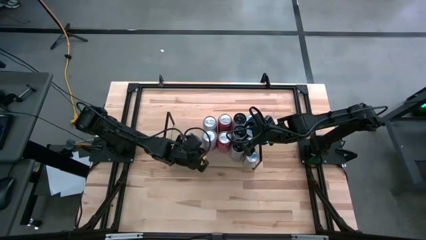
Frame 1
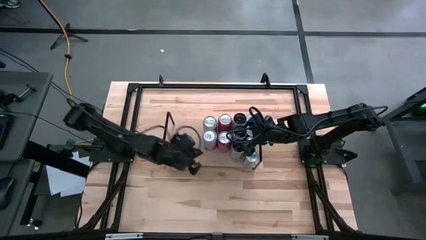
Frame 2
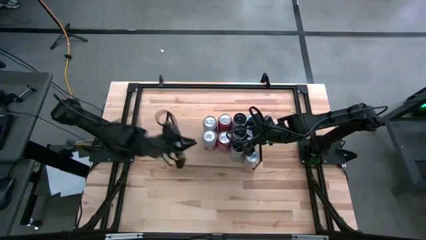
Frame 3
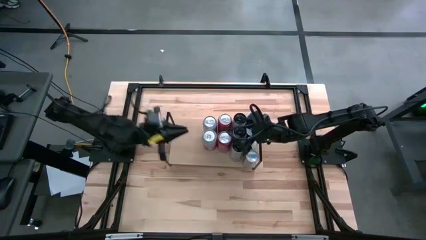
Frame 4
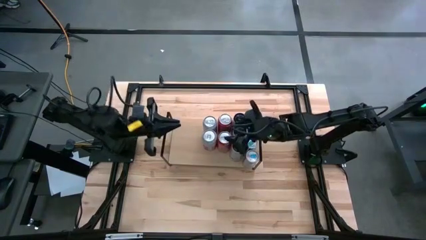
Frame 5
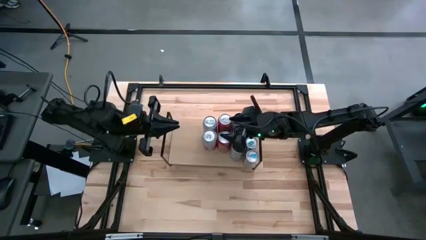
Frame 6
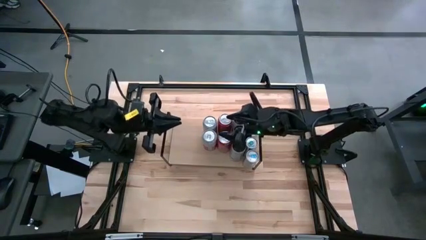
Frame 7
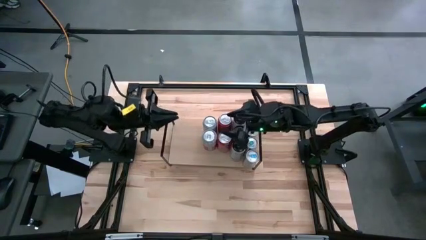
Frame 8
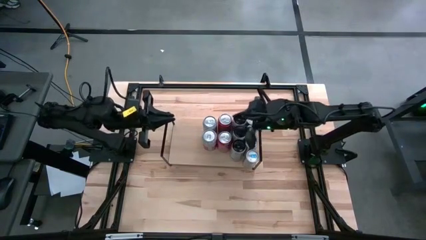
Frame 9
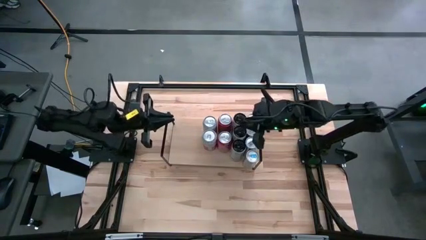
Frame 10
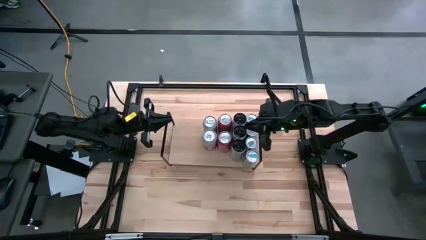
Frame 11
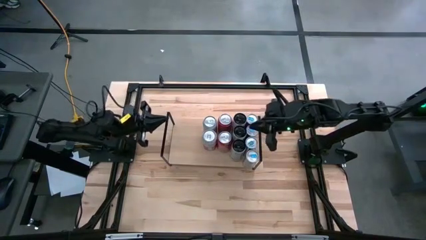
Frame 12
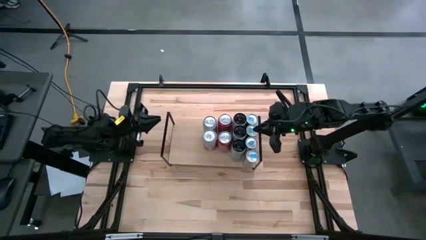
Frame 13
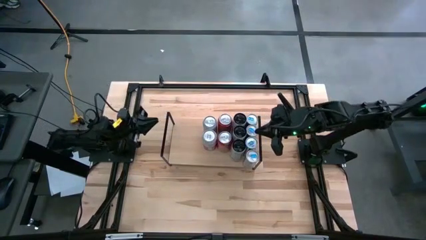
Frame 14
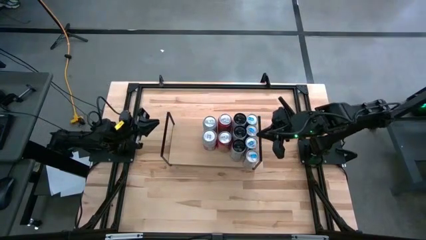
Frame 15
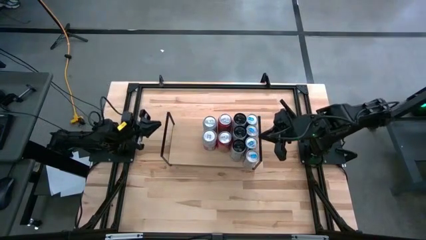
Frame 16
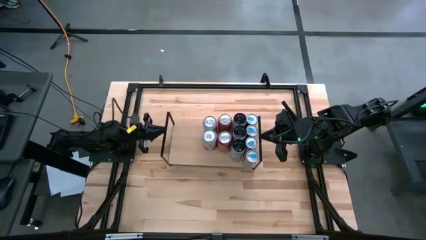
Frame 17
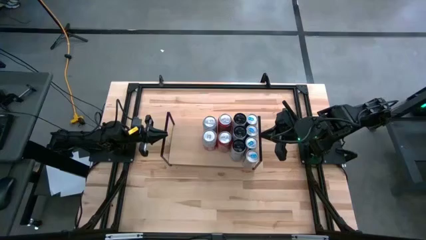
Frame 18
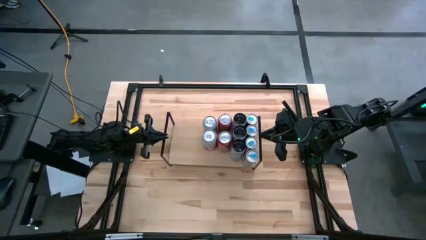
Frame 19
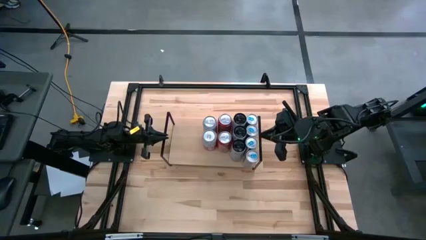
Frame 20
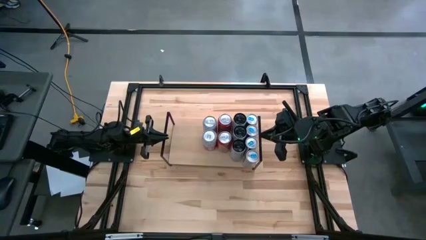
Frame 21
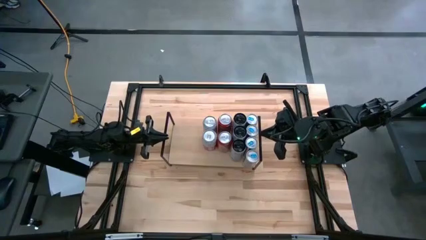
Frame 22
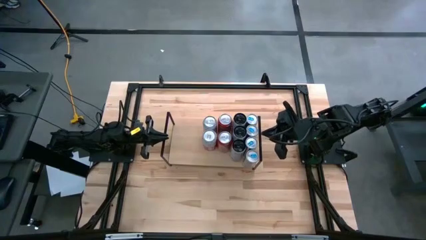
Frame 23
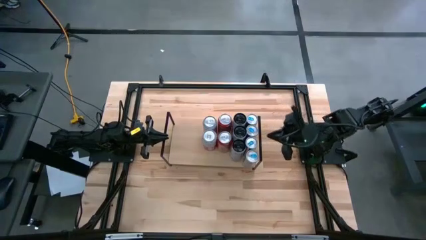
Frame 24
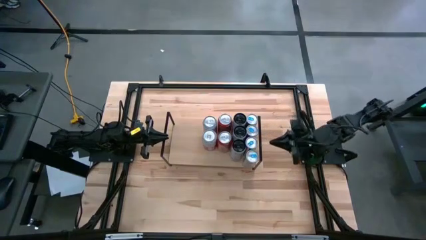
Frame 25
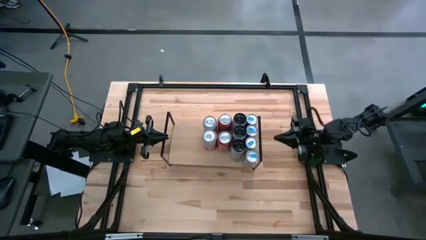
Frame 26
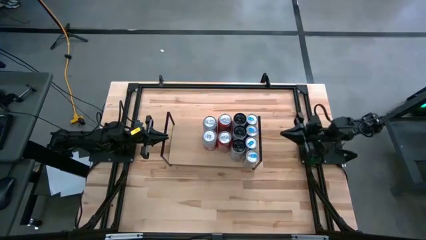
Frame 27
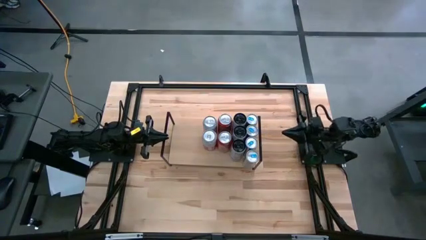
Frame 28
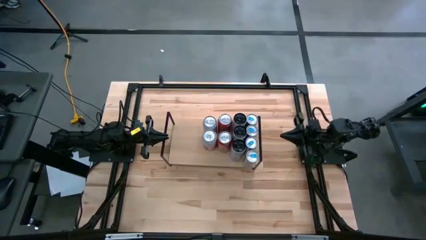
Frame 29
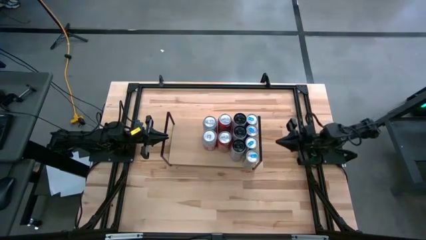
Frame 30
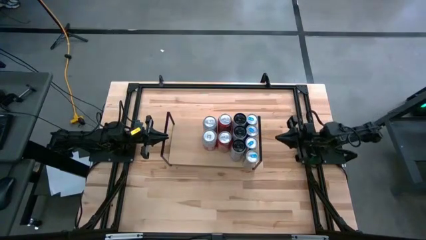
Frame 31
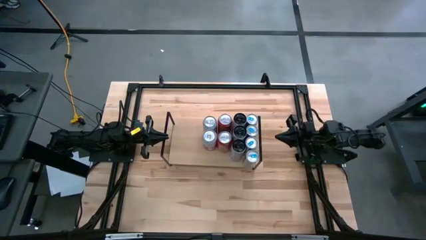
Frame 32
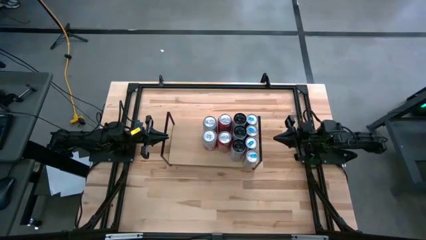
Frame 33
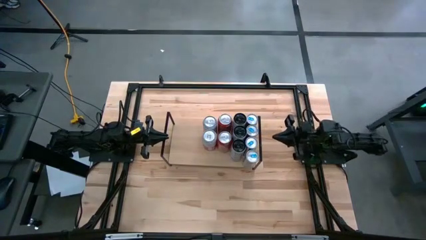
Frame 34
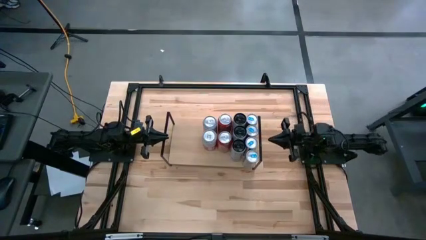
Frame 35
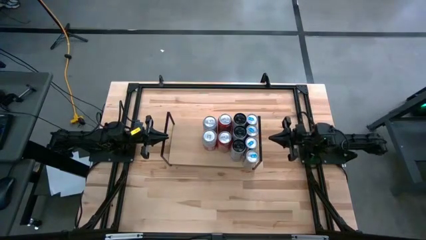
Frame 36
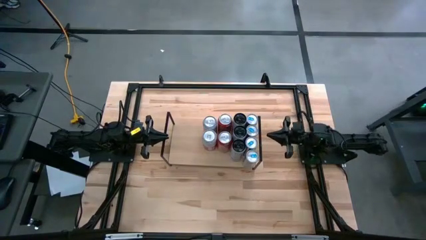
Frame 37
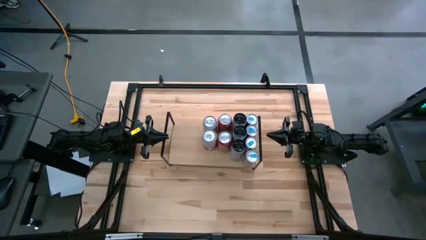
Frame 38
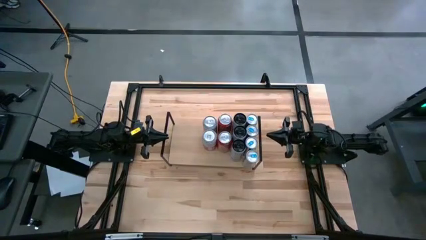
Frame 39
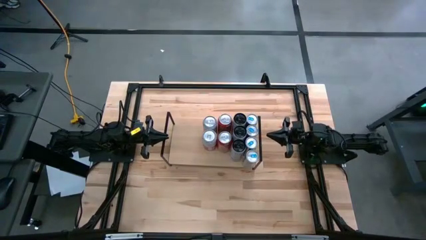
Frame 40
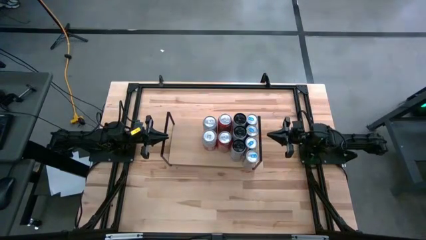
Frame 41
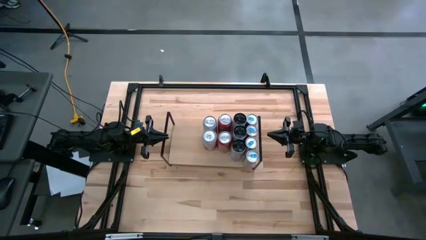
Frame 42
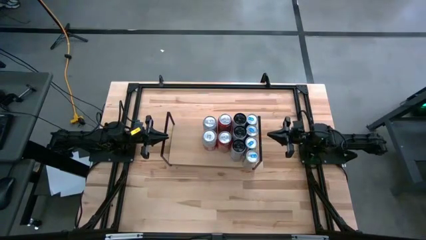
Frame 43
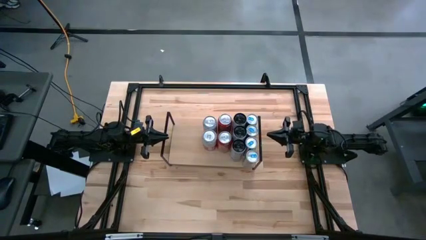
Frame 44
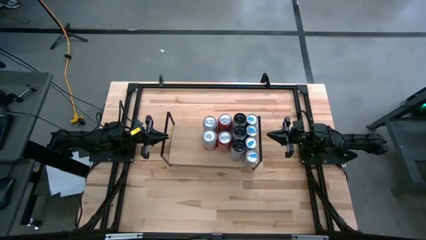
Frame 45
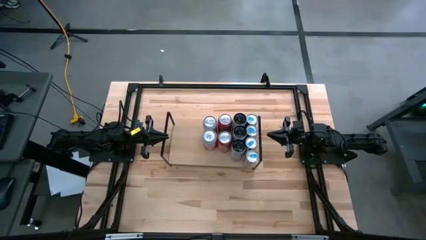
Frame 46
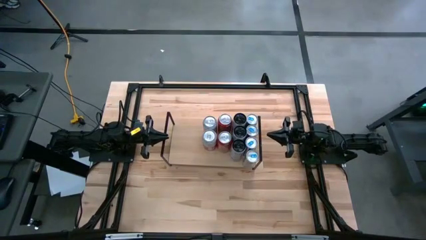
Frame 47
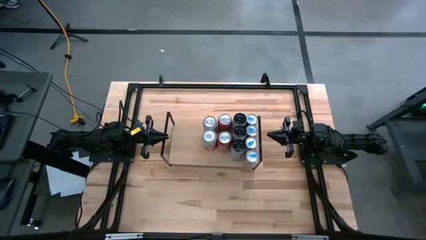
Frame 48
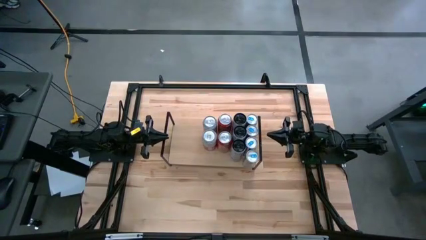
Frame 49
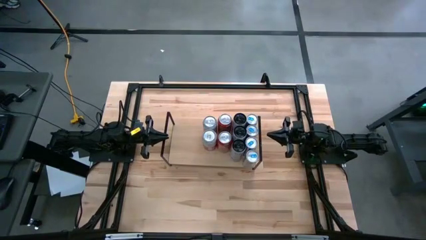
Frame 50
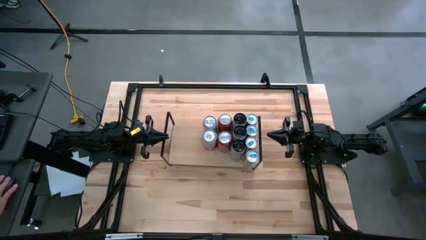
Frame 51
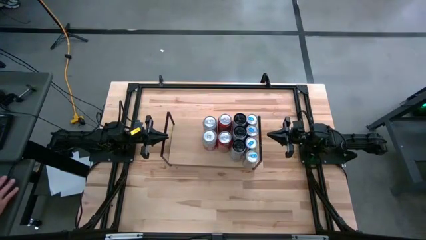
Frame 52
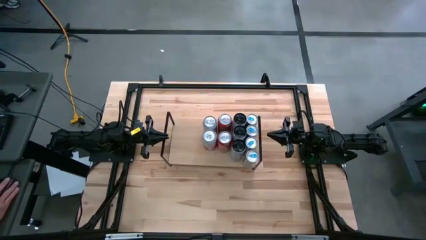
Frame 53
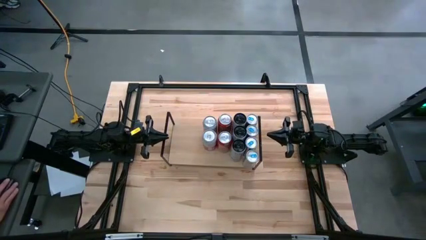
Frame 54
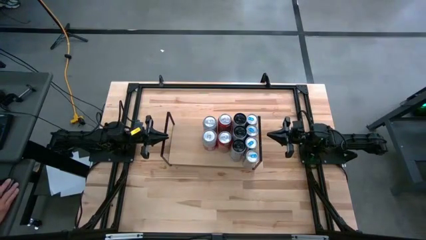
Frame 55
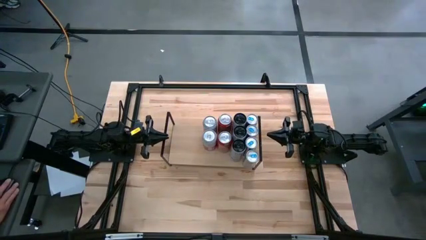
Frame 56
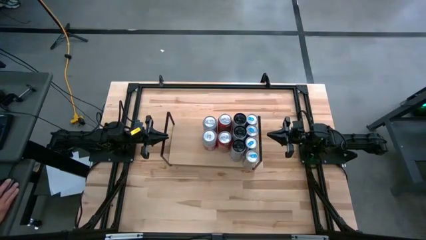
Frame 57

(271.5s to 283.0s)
Task: Place canned beverage on shelf
Return to Home Position
